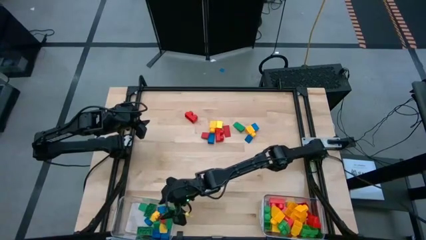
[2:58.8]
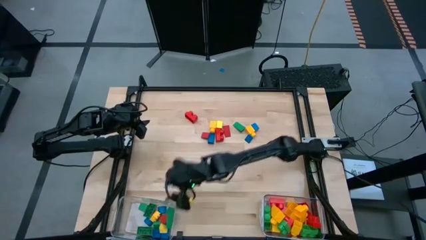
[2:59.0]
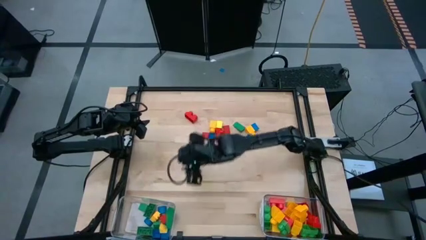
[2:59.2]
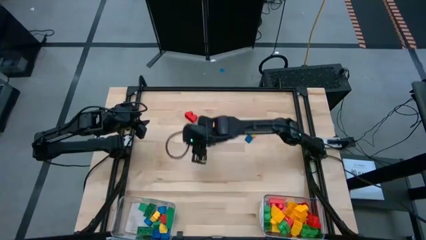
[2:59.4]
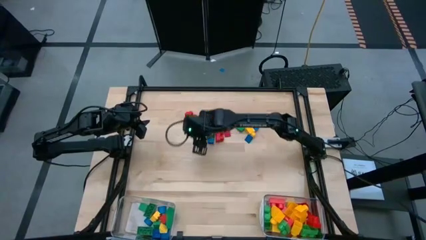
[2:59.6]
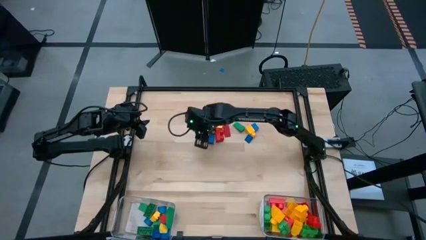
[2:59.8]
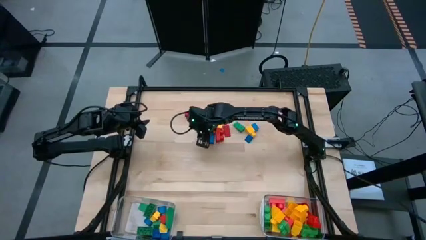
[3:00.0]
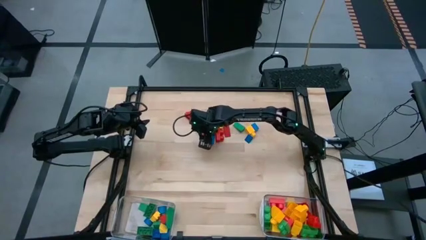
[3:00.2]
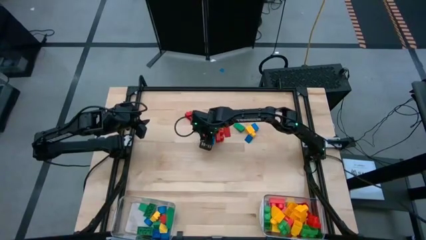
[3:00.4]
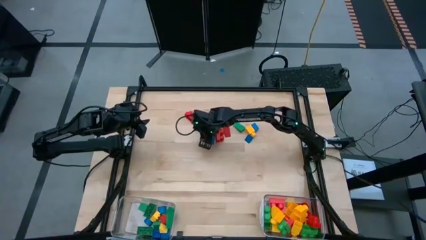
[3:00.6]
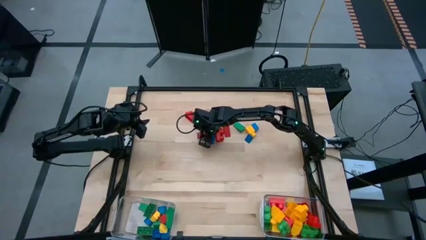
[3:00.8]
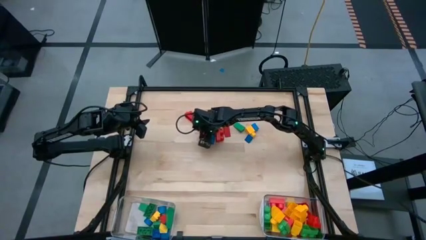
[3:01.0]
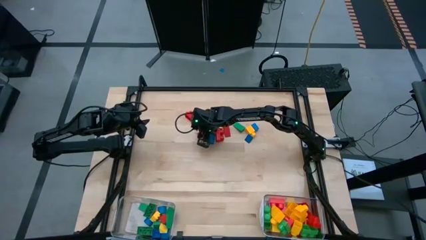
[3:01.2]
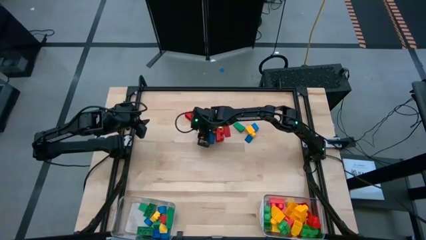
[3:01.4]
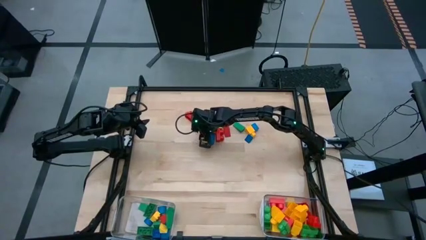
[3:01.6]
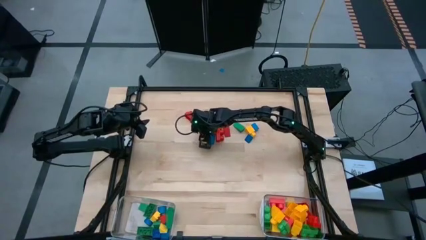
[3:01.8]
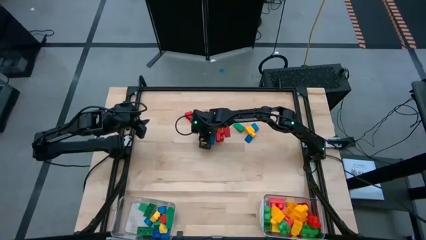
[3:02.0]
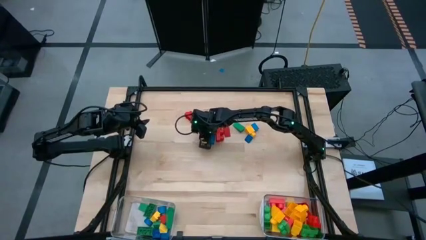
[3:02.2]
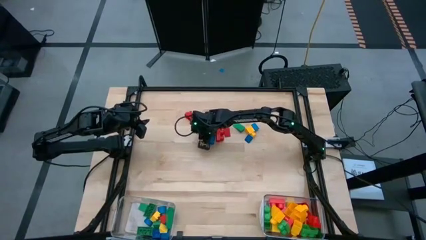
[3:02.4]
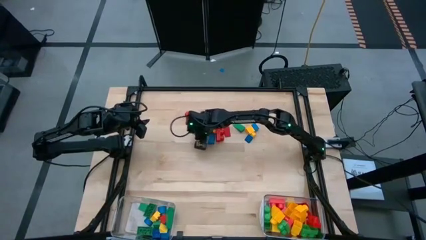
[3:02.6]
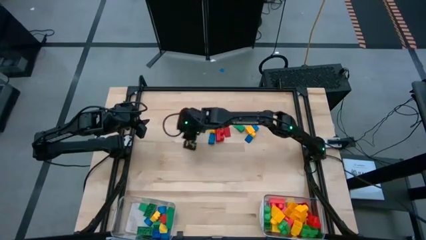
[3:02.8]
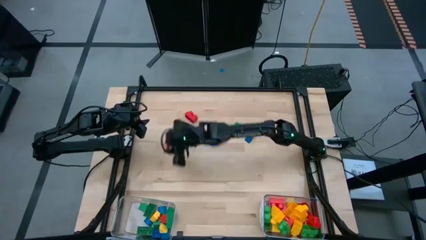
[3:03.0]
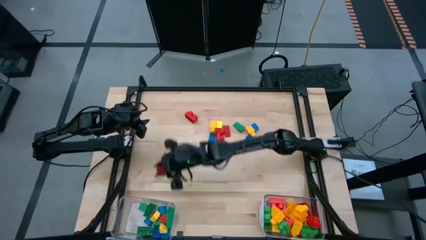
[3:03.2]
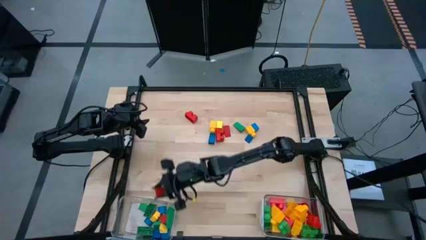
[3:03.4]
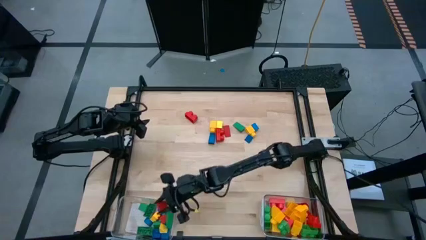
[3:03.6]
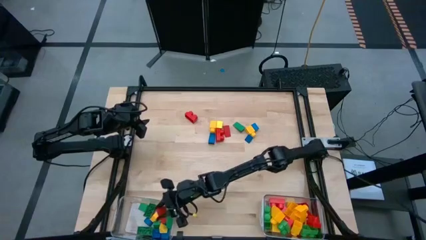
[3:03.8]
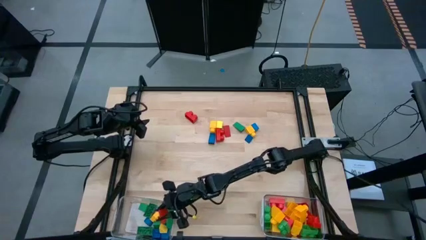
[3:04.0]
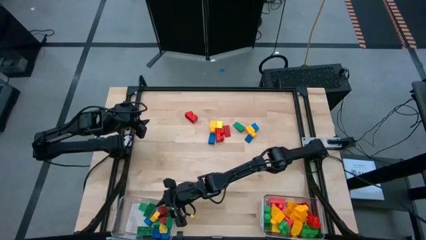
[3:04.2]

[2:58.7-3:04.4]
Task: Sort blocks by size
Put the red triangular block into the left transparent bin

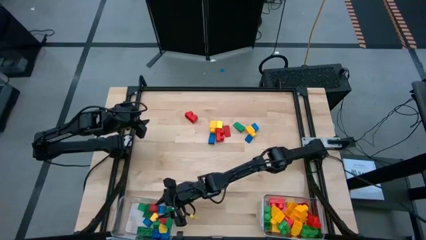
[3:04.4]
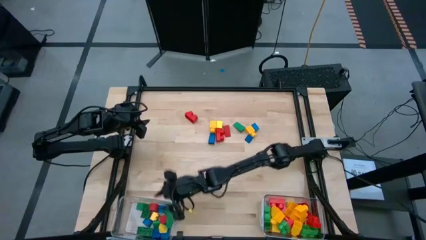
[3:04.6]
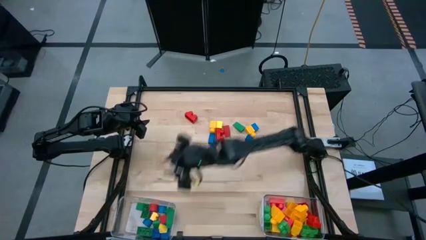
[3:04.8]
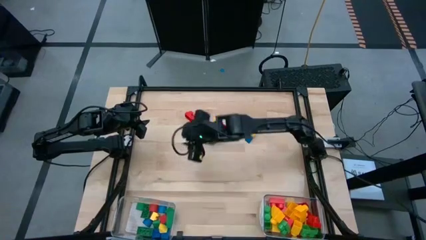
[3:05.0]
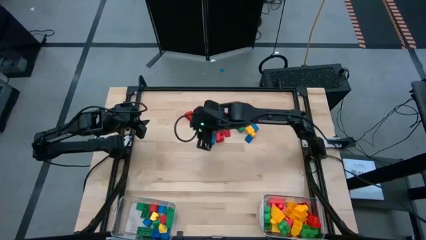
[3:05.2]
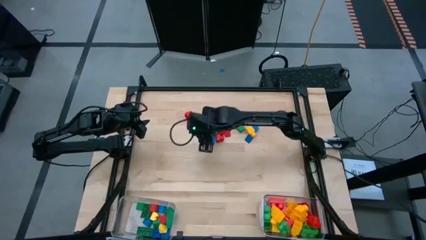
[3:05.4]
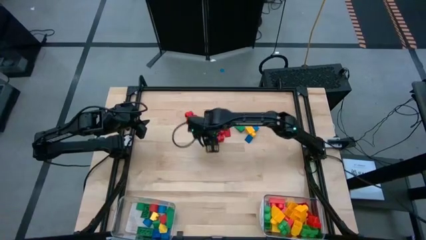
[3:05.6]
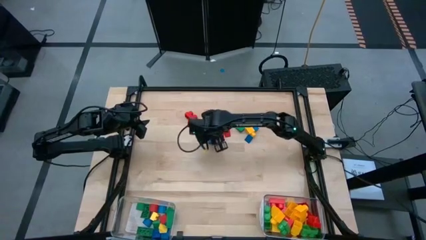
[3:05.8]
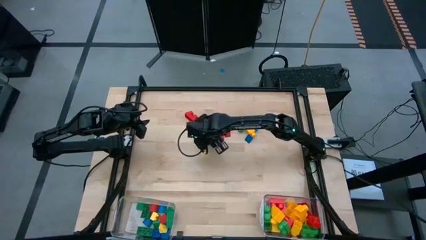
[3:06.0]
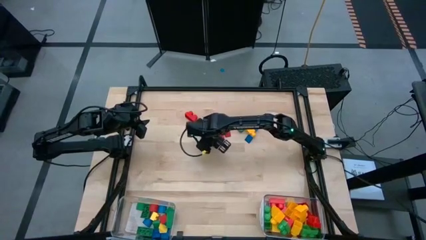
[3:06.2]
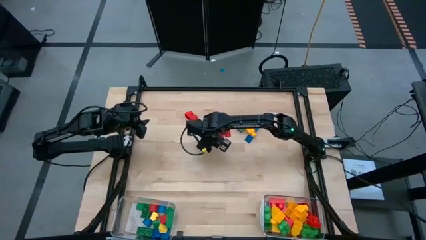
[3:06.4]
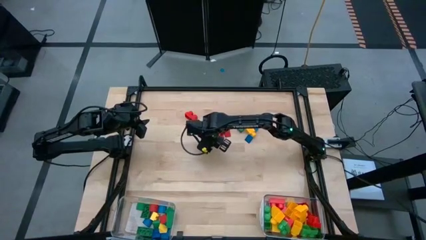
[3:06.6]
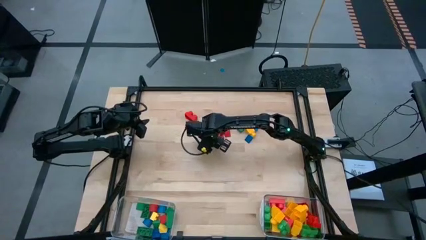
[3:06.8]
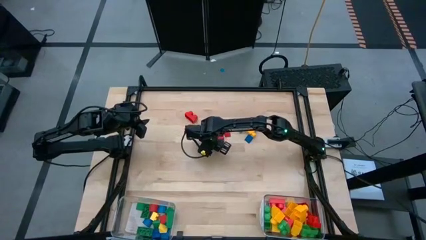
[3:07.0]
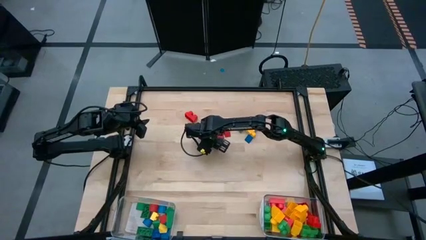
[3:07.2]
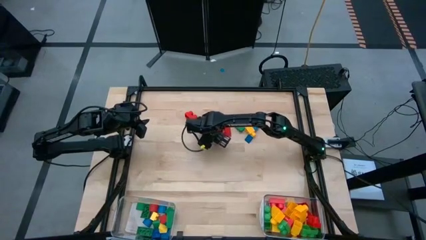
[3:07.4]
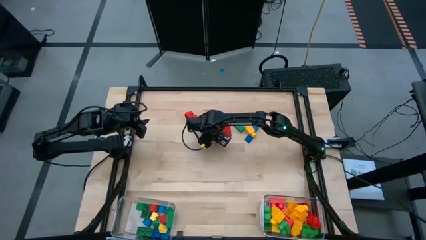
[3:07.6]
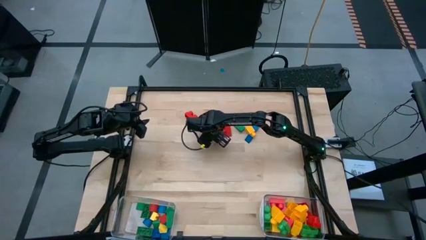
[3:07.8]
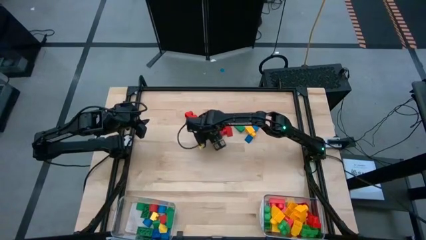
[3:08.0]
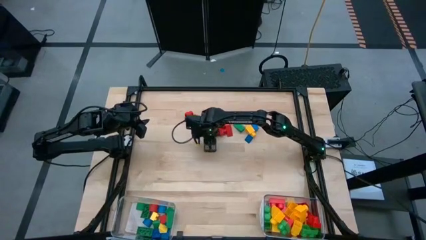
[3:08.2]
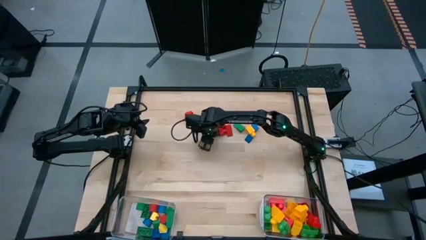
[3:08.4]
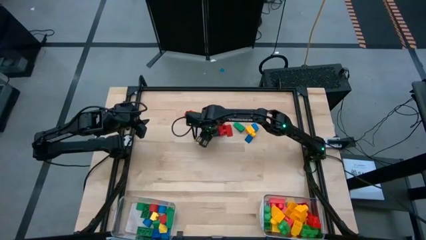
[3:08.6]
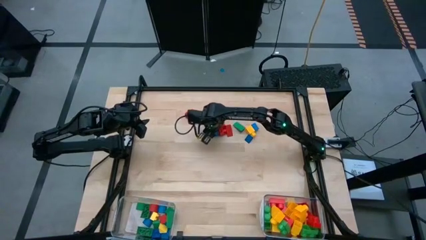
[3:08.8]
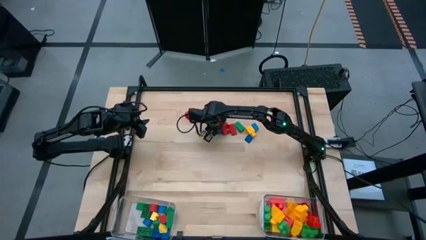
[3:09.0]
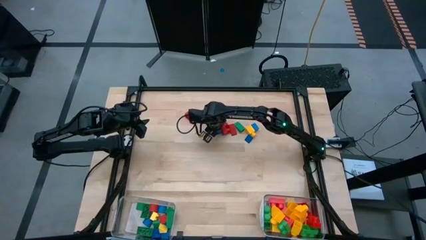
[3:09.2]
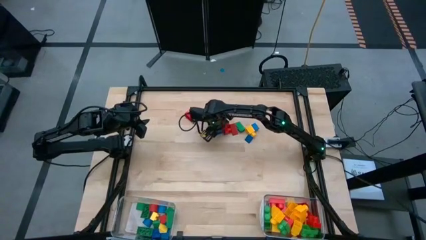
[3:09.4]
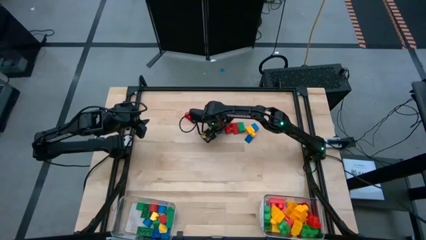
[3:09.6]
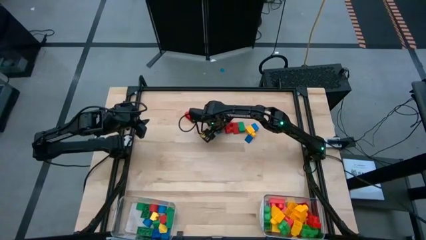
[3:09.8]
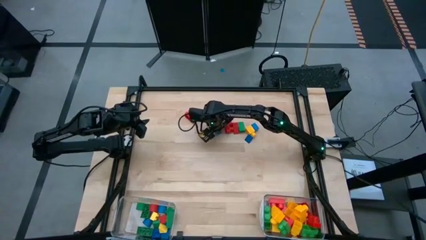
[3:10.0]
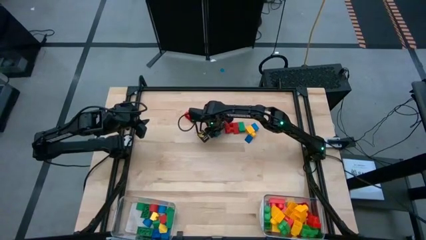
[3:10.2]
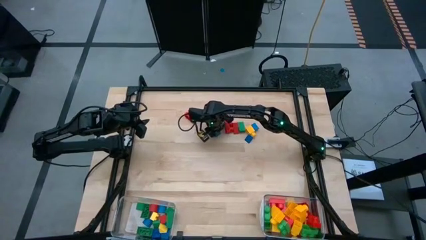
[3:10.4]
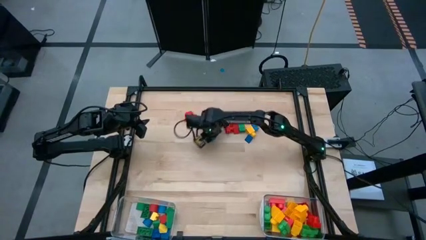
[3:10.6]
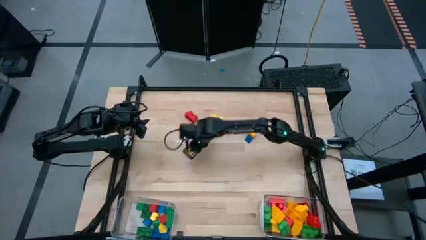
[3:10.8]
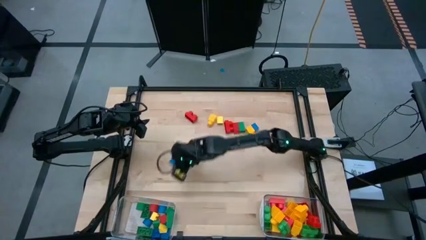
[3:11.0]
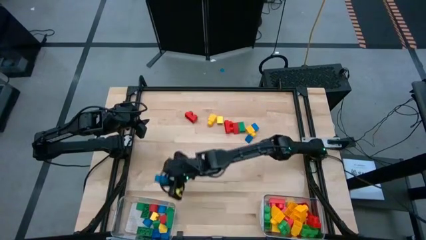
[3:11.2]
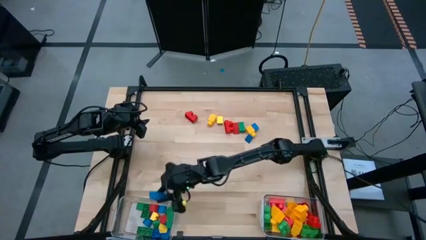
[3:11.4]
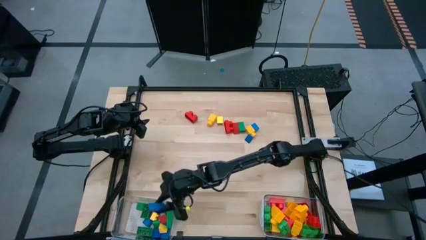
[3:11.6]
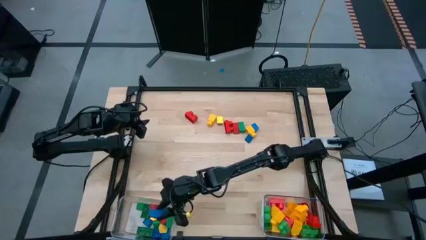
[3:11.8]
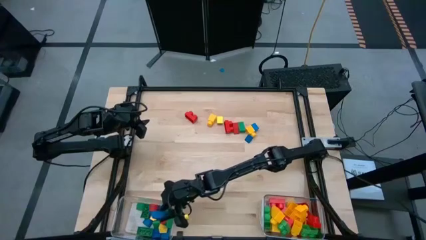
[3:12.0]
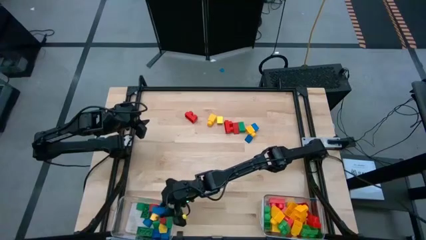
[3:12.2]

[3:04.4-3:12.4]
Put the blue triangular block into the left transparent bin

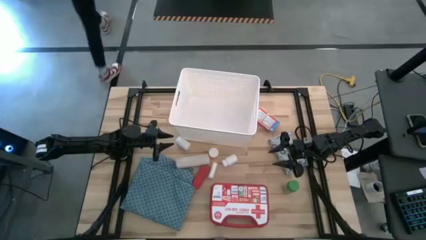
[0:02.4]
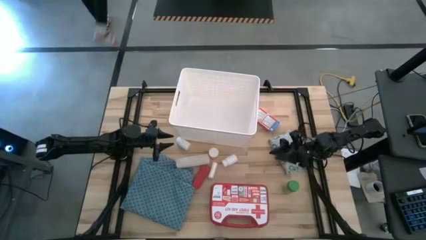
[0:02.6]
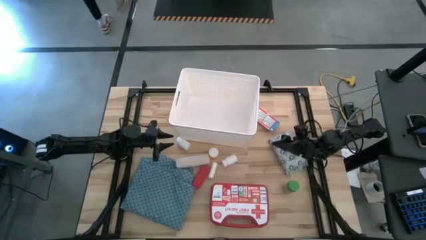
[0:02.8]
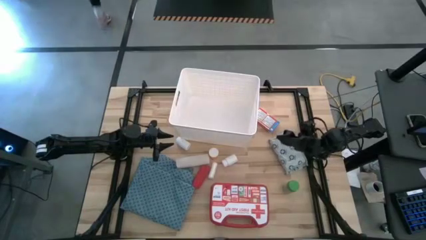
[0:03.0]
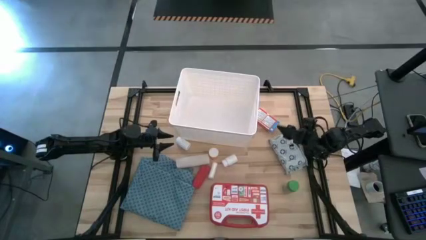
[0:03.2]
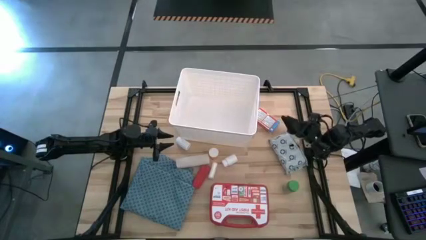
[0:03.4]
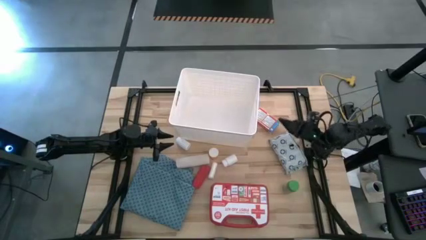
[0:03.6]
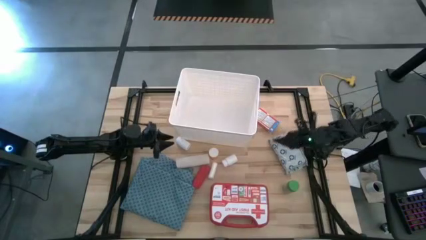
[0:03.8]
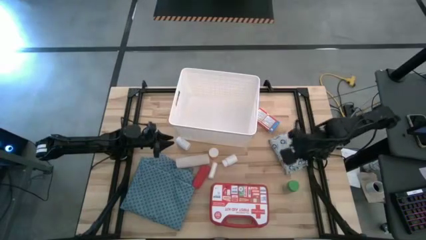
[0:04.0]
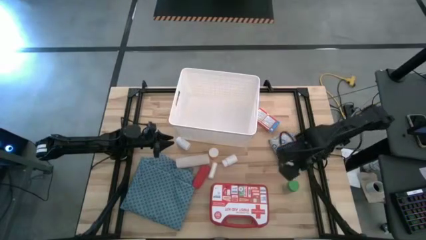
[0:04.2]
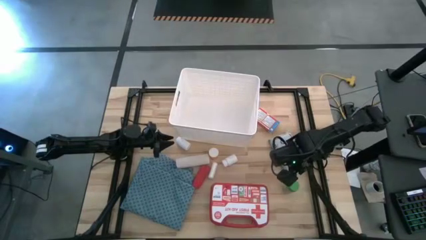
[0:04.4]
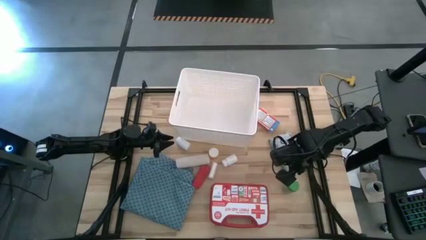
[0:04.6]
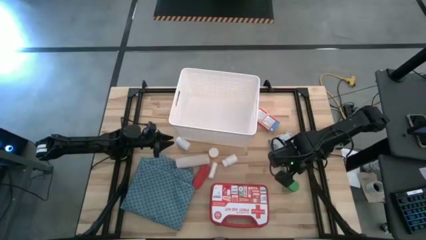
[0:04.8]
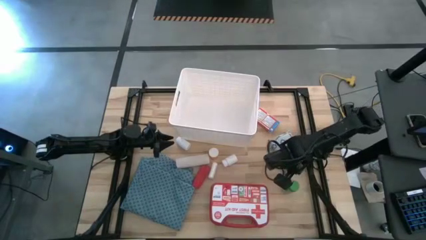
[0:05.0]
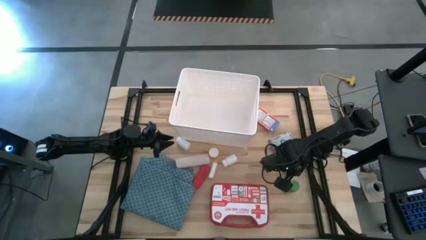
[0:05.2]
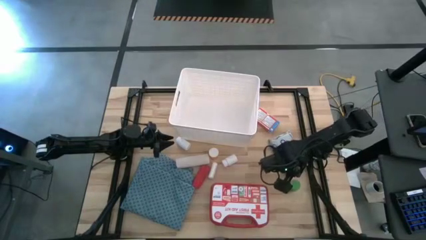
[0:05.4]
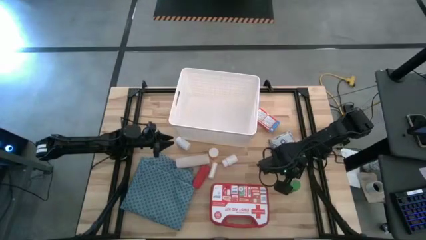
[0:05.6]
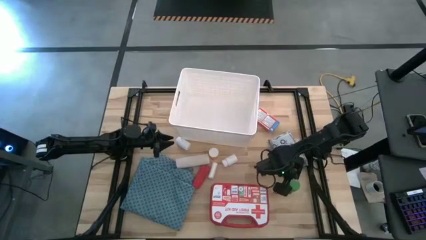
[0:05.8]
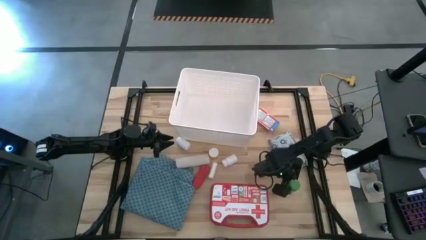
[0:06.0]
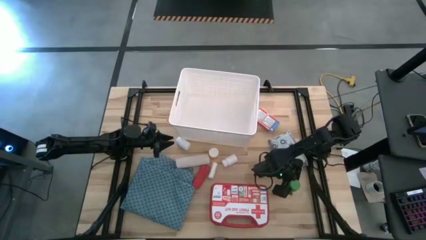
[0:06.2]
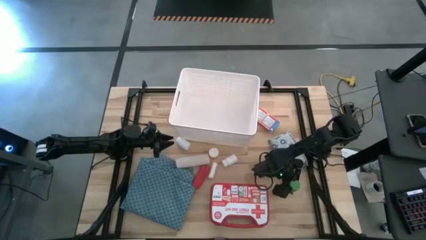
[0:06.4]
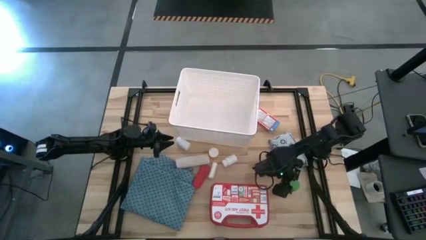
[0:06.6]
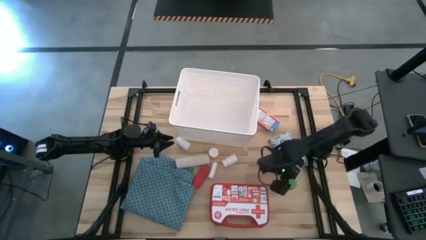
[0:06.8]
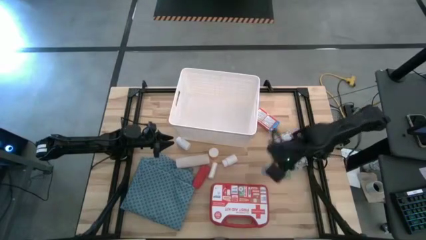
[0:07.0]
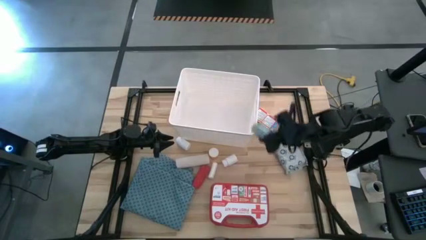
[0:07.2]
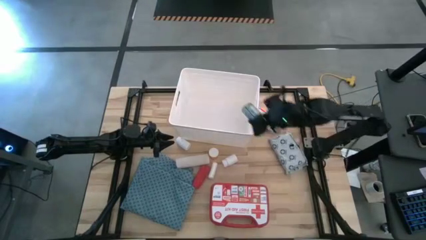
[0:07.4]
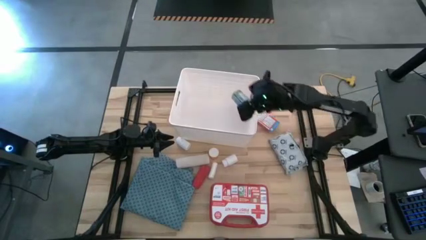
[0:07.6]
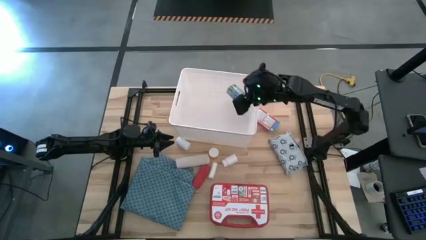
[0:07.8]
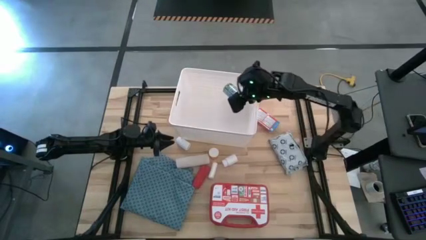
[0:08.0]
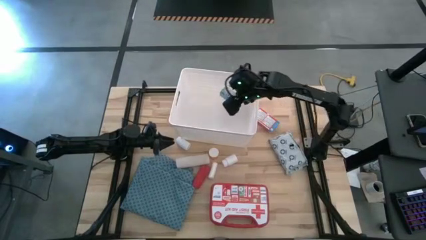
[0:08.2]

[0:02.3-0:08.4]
Task: Pick & place medical supplies in basket/bin
Put the green pill bottle into the white bin
